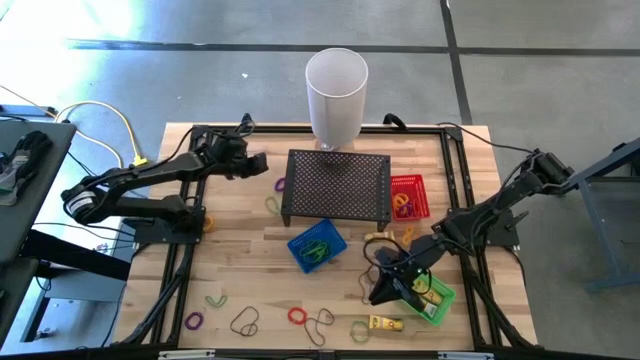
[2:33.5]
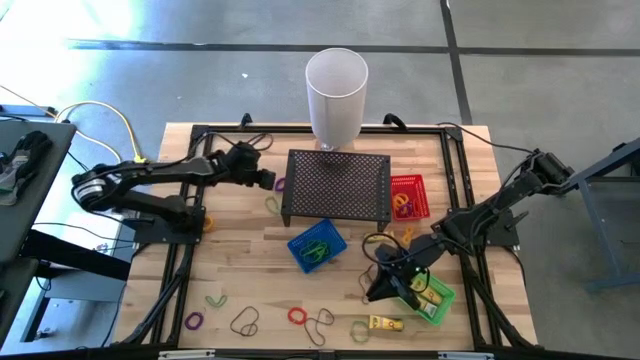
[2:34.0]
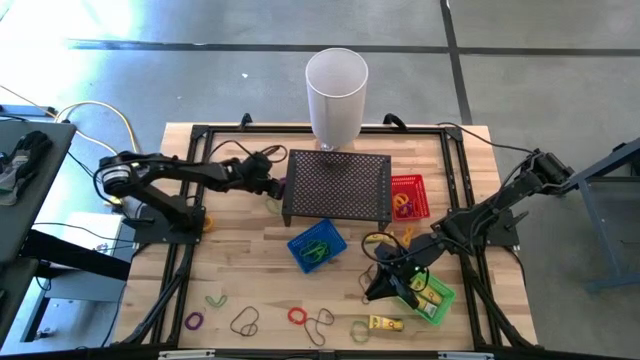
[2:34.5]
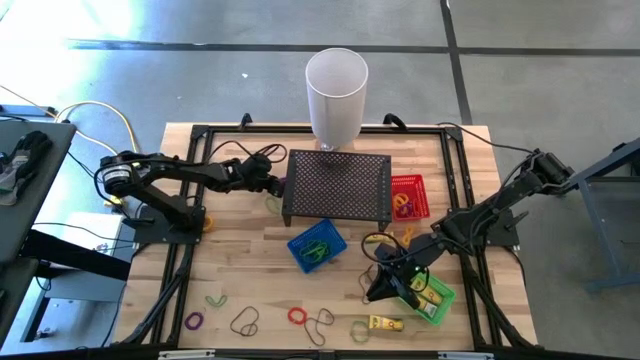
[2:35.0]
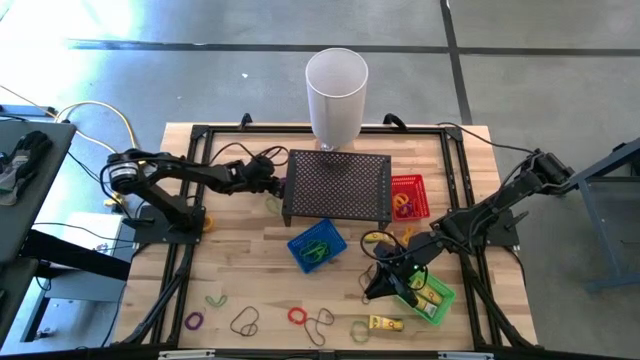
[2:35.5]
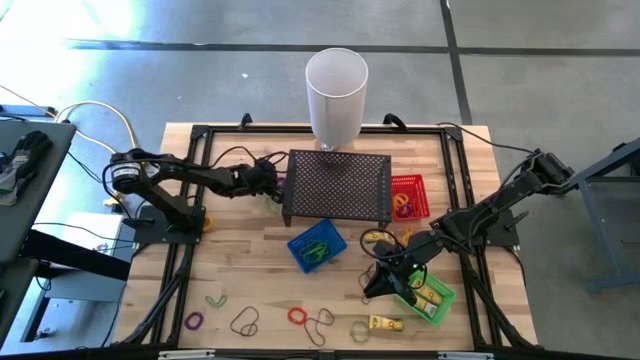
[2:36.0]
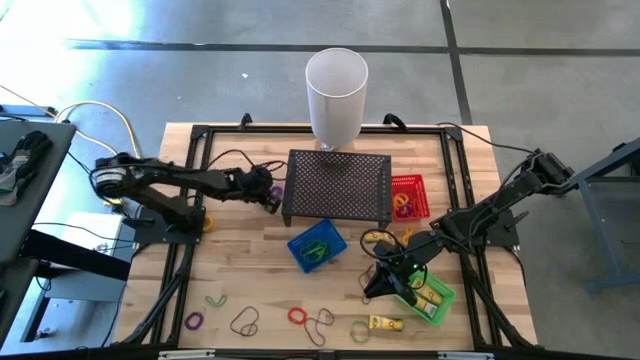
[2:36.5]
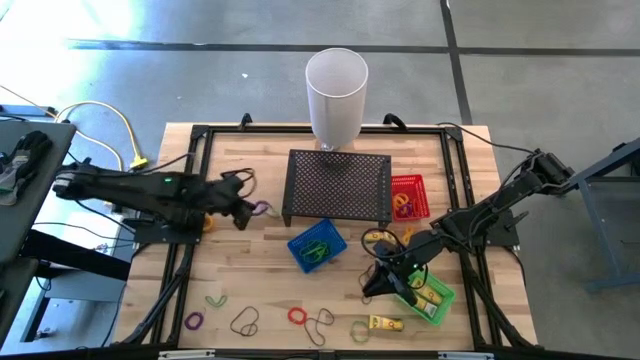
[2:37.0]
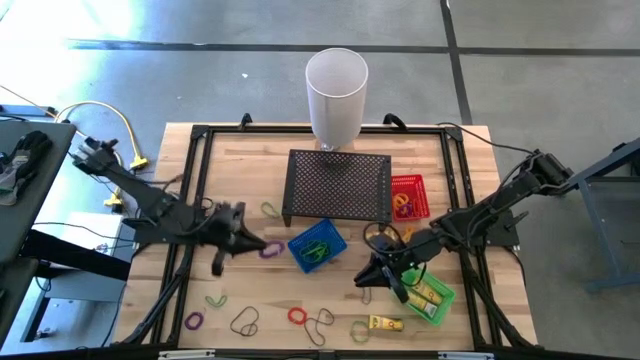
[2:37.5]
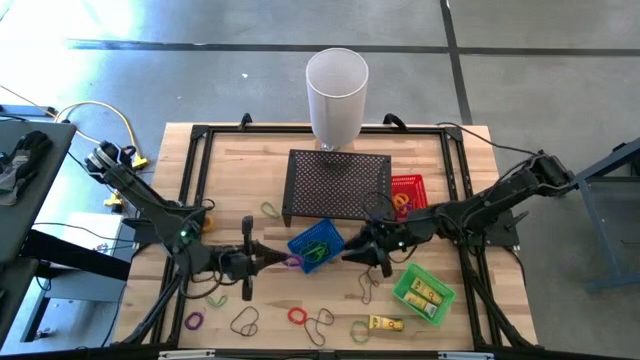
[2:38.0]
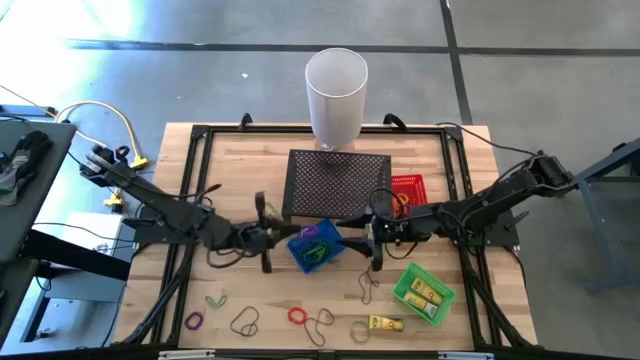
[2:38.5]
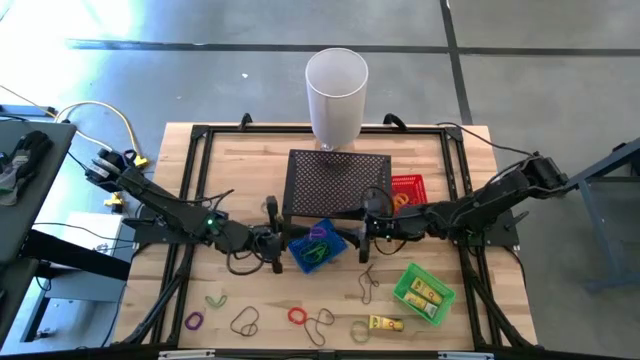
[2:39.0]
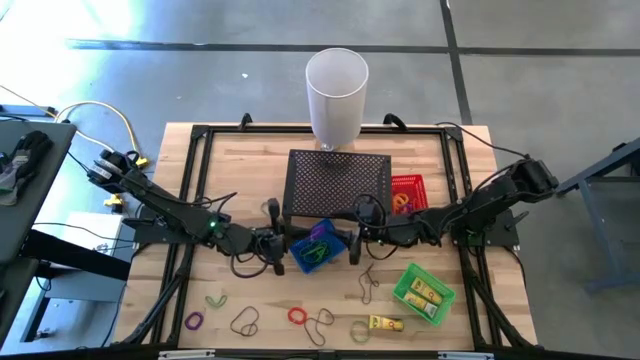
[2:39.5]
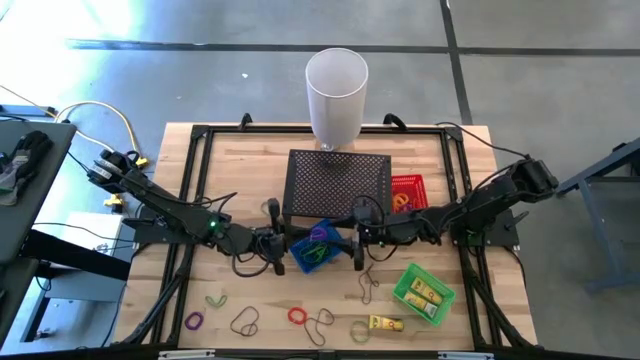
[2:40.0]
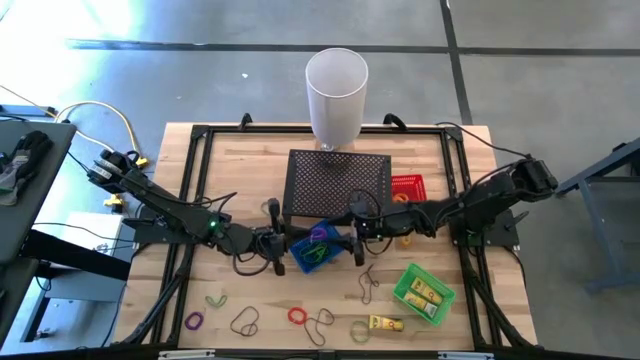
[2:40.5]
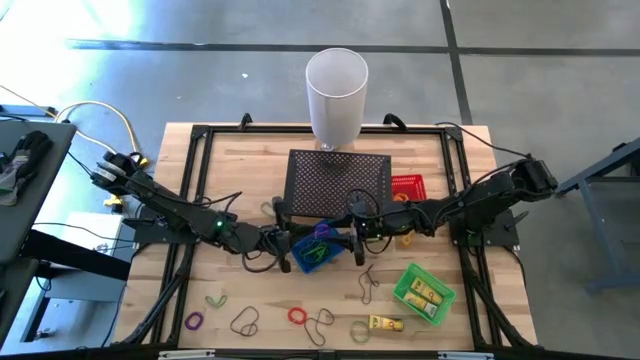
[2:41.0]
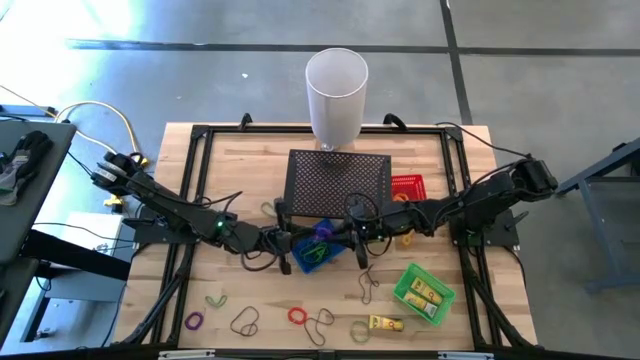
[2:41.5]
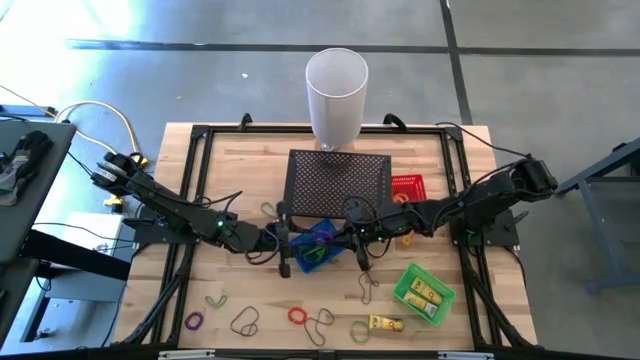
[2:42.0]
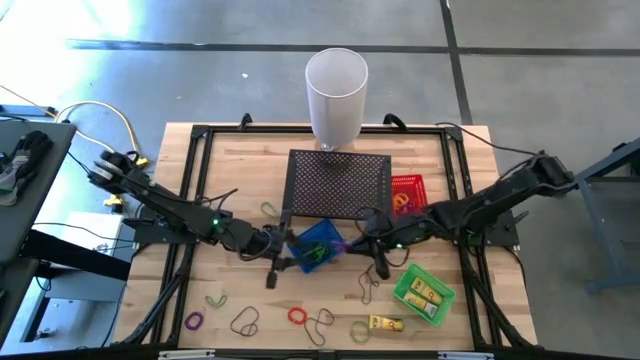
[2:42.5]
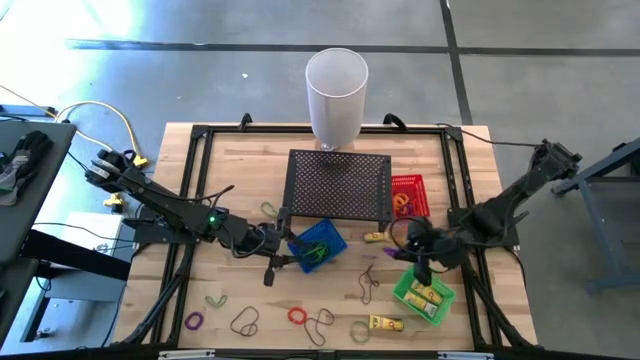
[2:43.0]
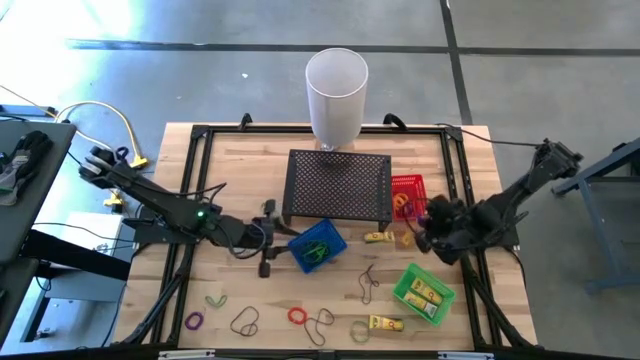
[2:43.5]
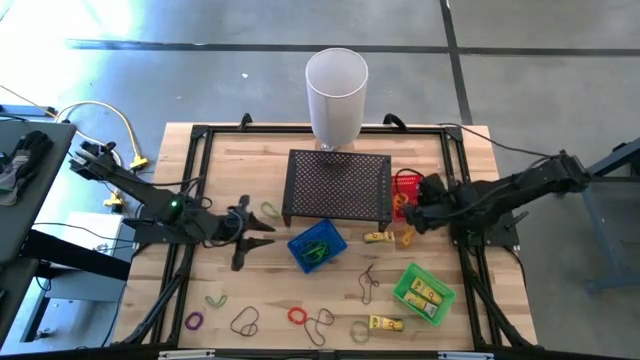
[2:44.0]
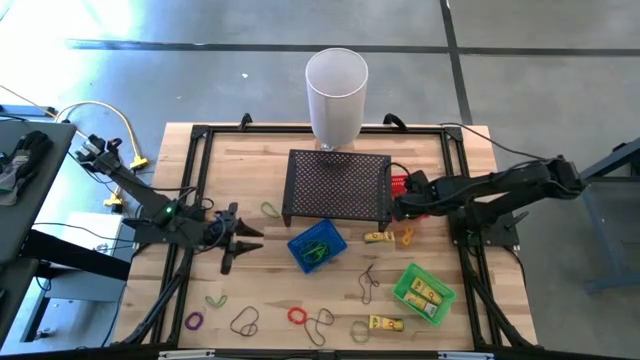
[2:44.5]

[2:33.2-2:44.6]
Task: Pick & Place Office Desk Supplies
Put the violet spring keychain into the red bin

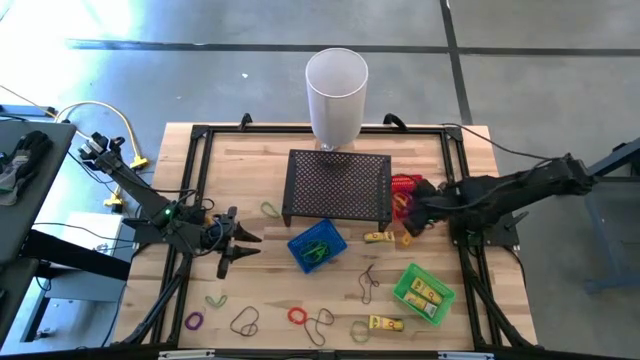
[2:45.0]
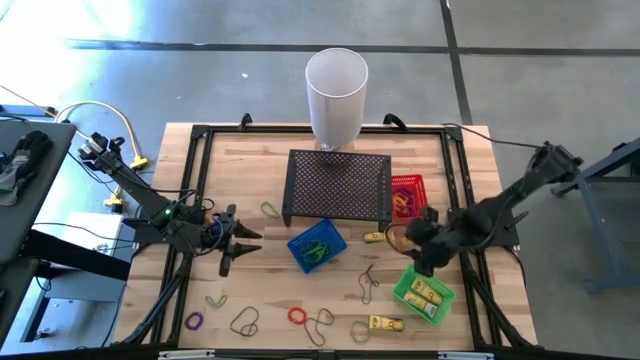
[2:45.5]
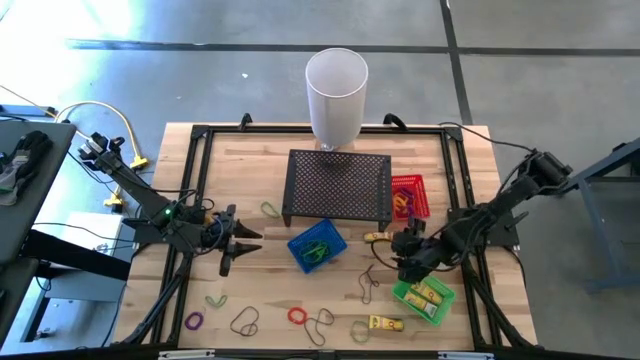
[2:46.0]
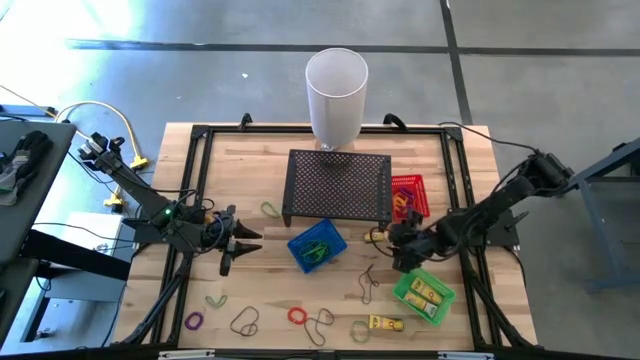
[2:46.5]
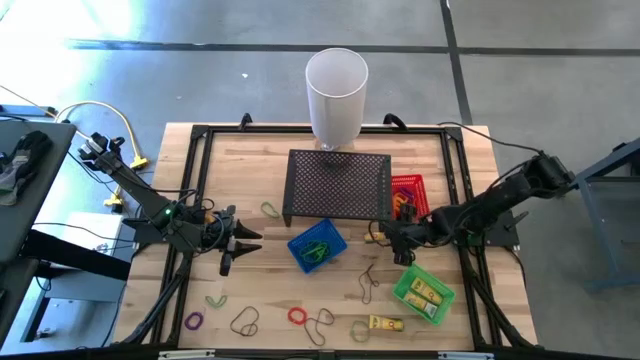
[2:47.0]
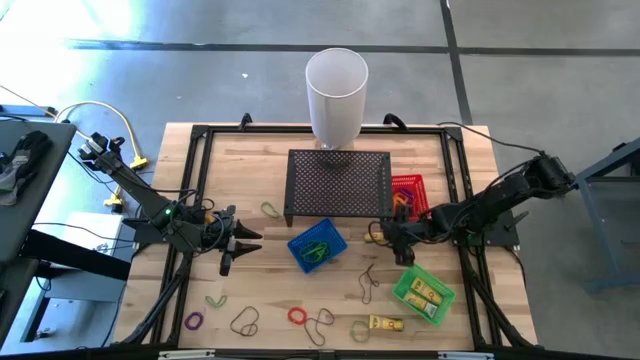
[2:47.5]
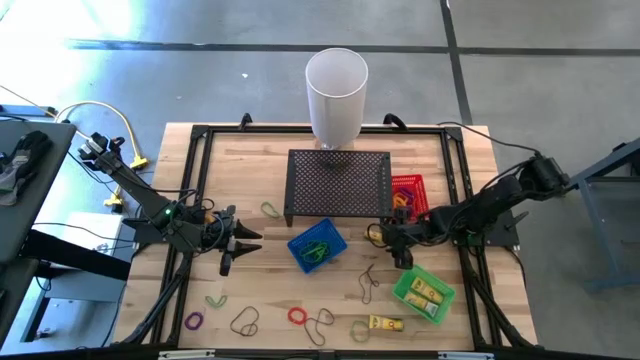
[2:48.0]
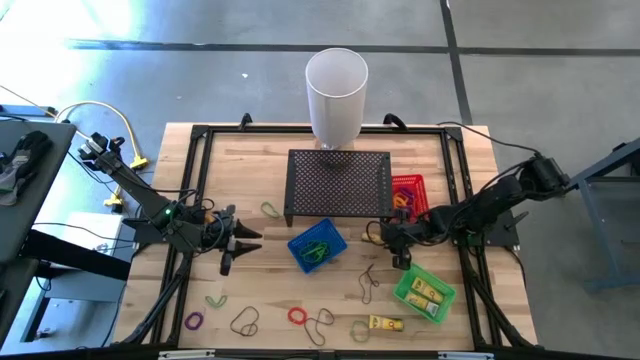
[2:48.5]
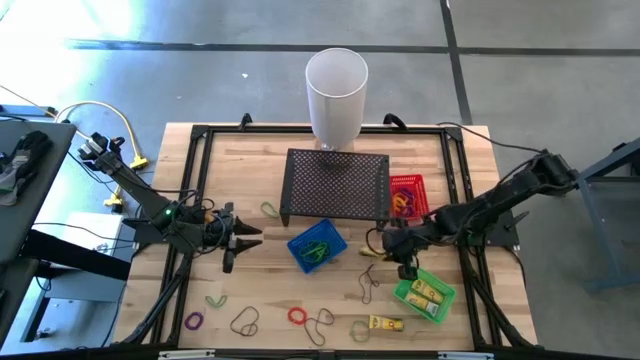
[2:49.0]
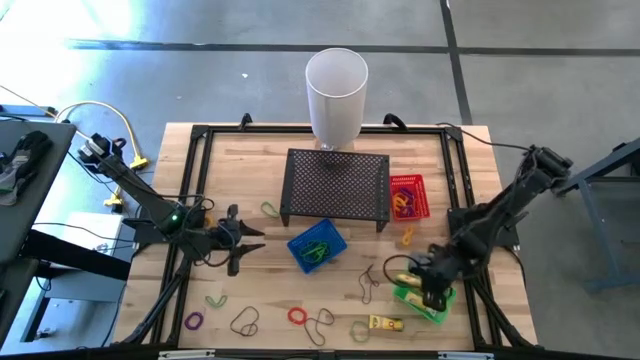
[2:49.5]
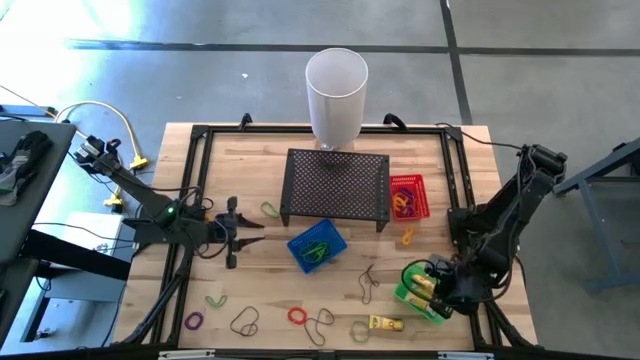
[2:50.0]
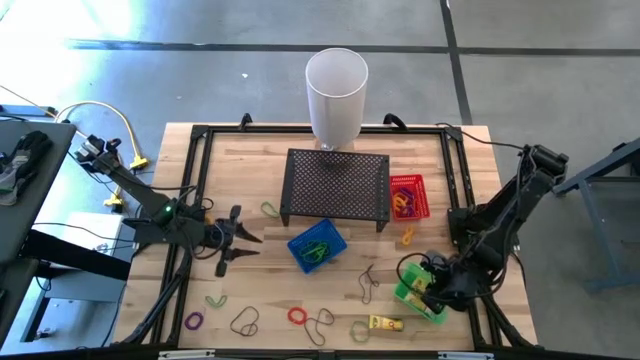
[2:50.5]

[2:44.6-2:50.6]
Put the yellow crayon box into the green bin

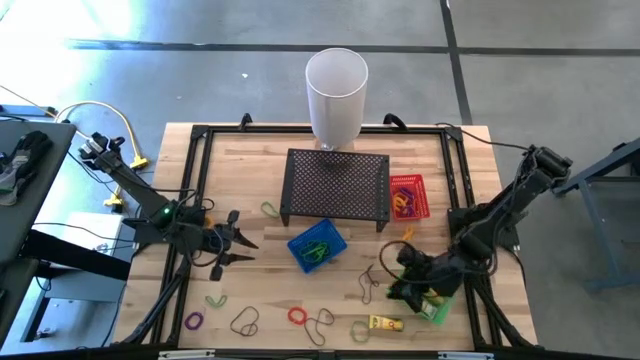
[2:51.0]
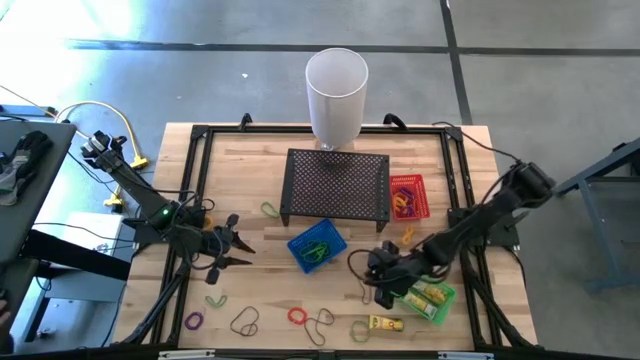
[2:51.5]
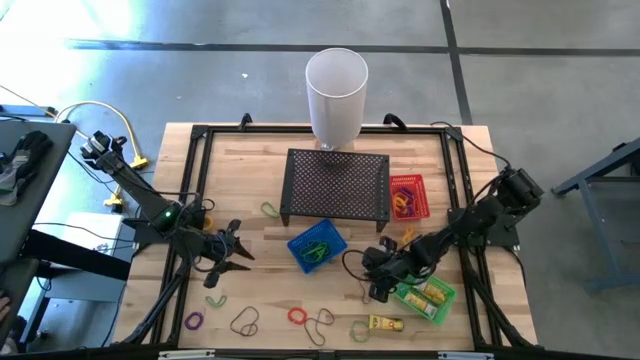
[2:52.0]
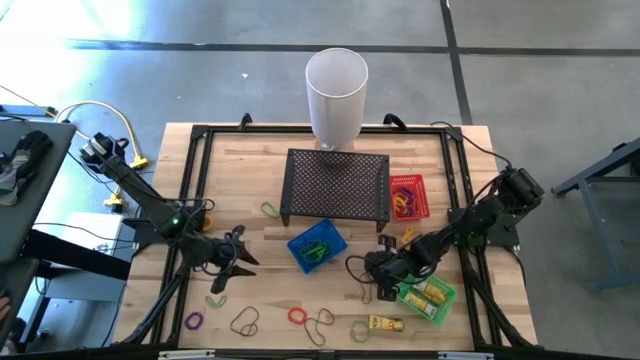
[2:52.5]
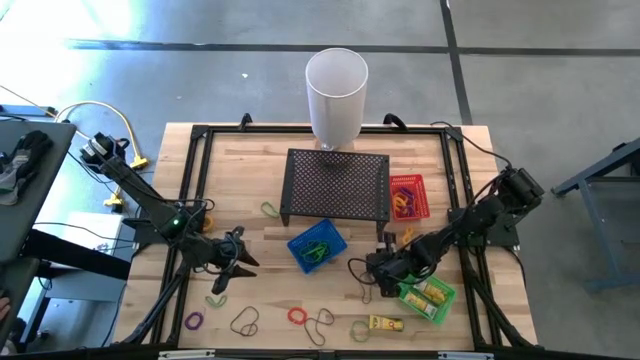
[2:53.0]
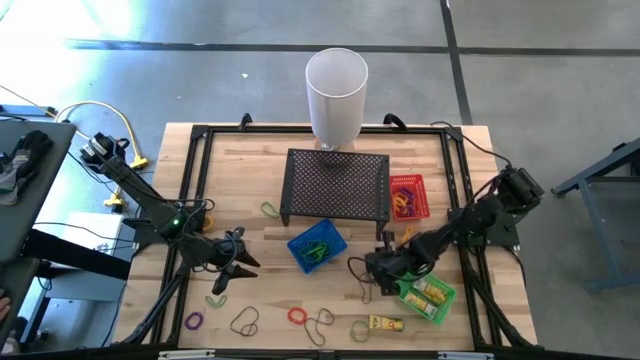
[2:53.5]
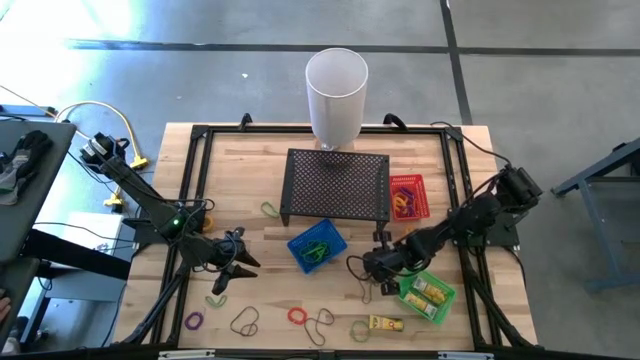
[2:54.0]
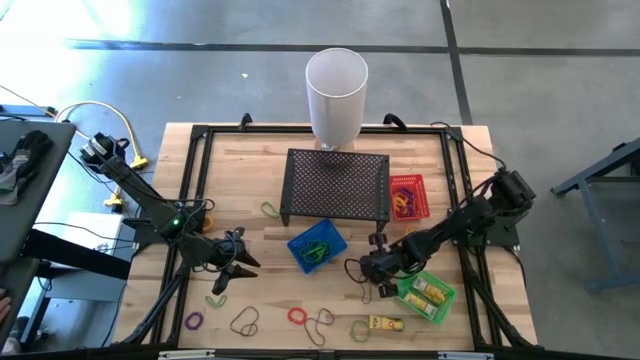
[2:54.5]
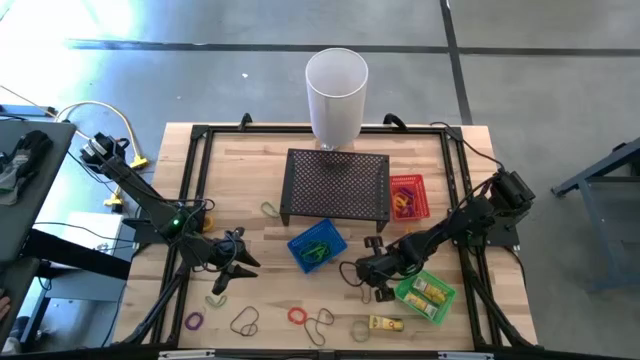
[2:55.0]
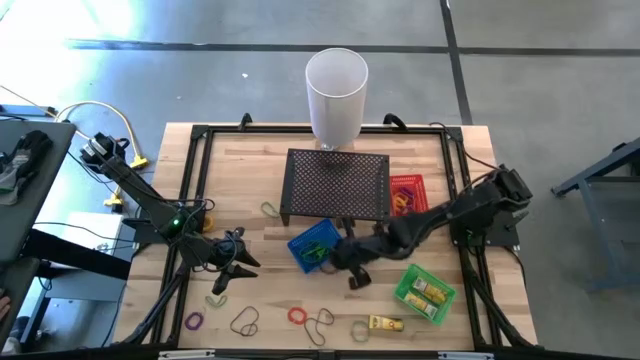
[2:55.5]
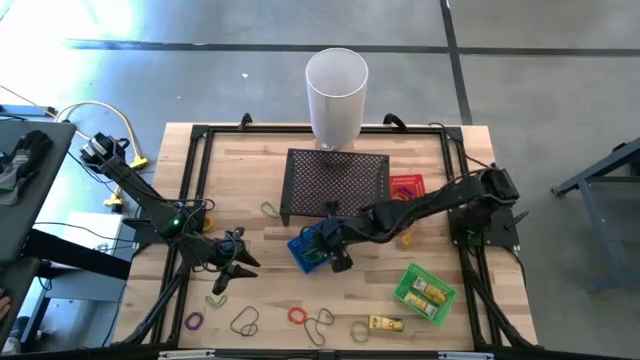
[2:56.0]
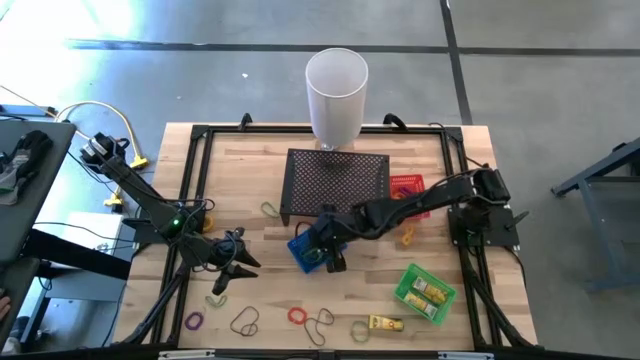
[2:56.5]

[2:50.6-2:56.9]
Put the violet rubber band into the blue bin
